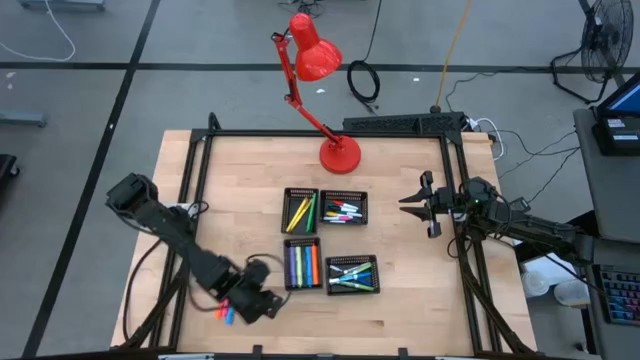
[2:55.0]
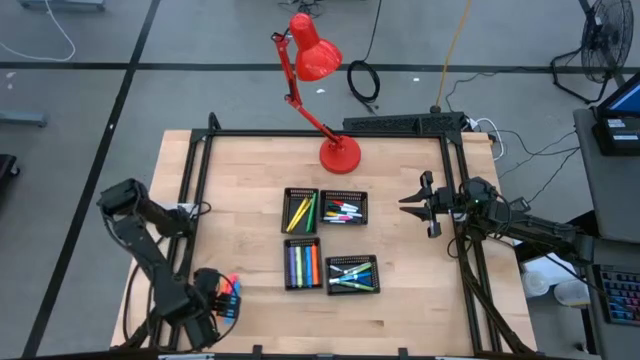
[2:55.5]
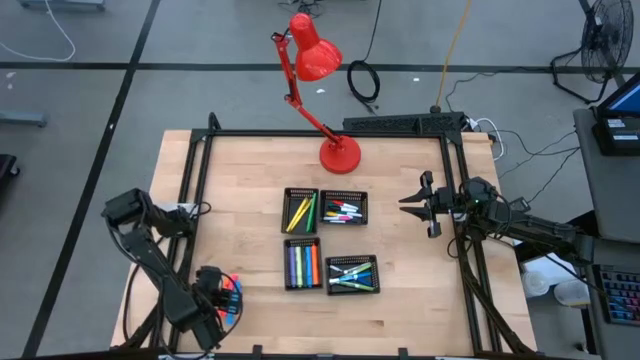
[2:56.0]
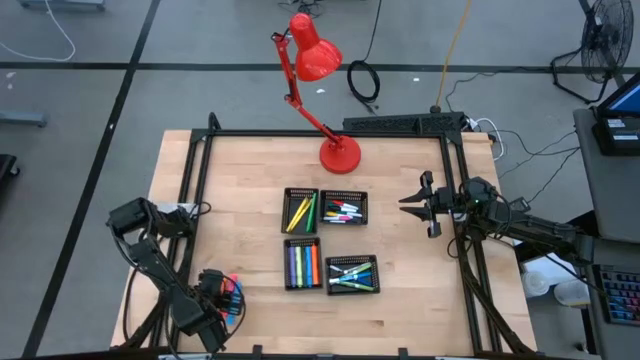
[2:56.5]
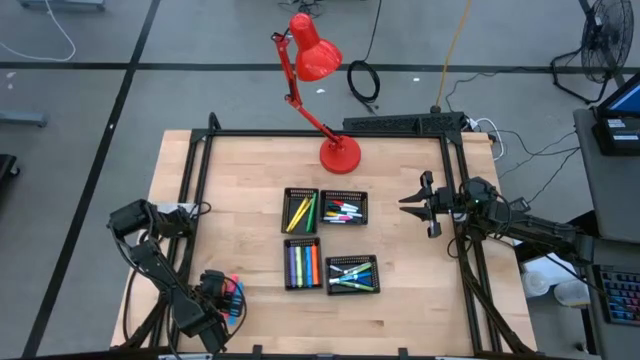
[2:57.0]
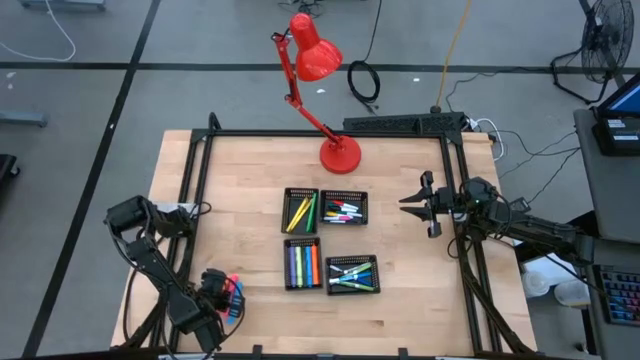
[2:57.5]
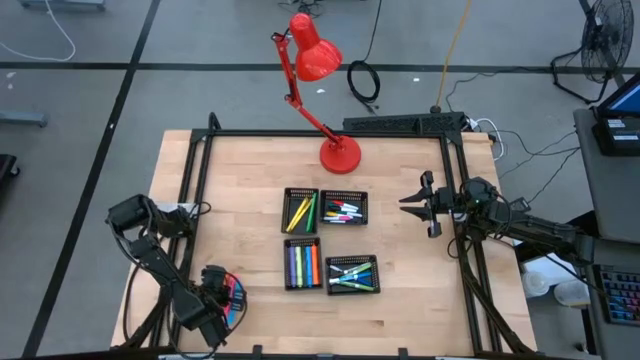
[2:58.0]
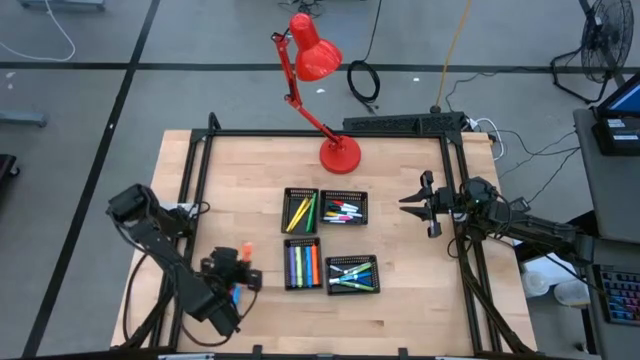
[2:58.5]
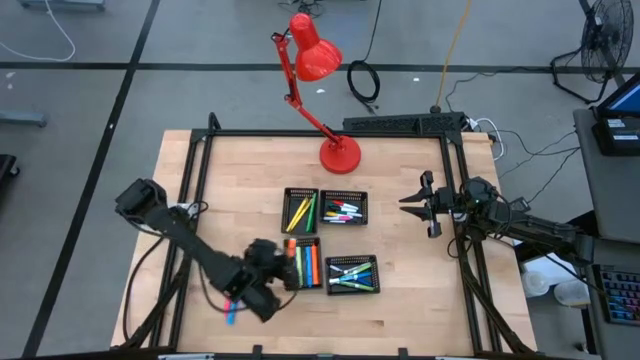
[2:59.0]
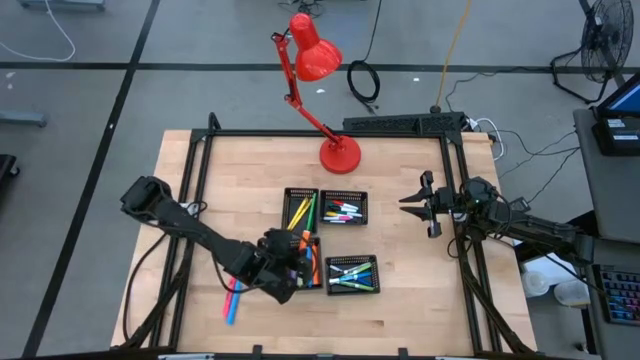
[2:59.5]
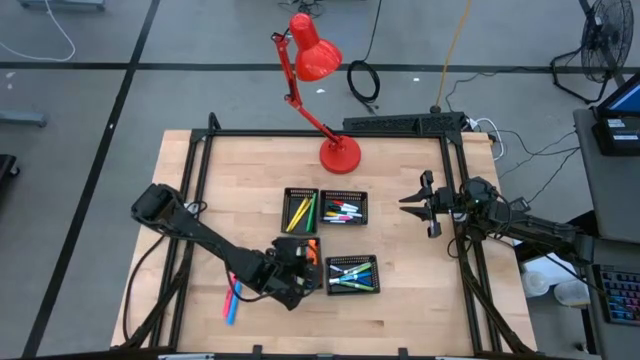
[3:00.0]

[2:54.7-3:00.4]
Task: Pick & Place Markers
Put the orange highlighter into the bottom left black bin

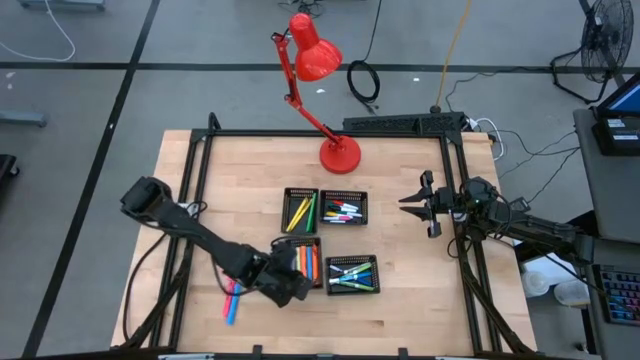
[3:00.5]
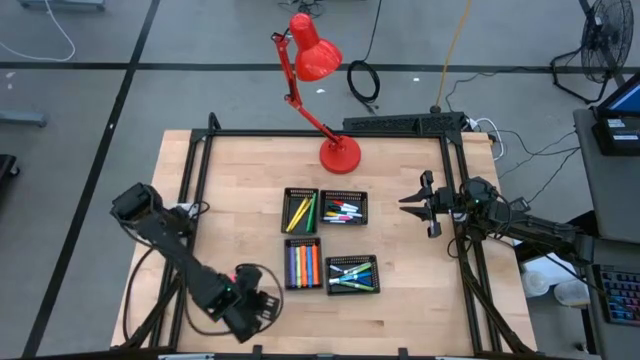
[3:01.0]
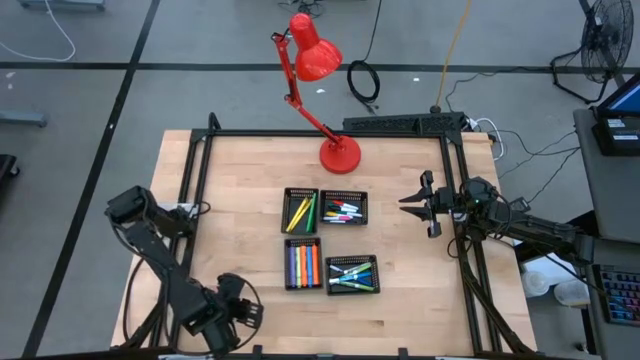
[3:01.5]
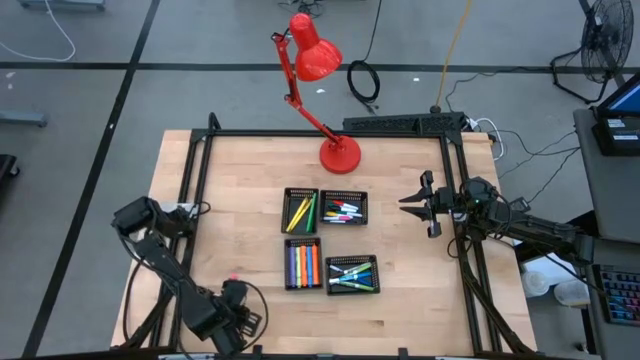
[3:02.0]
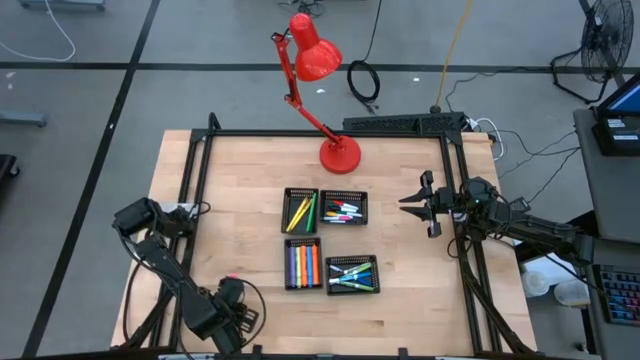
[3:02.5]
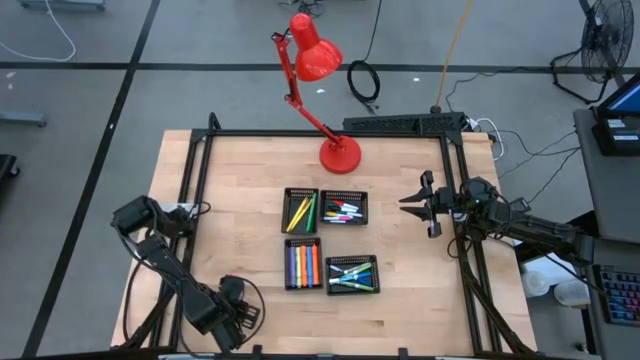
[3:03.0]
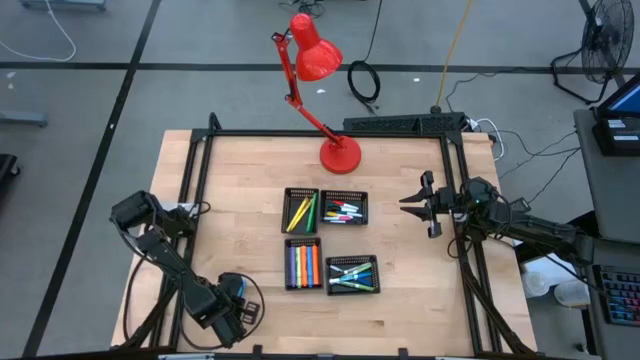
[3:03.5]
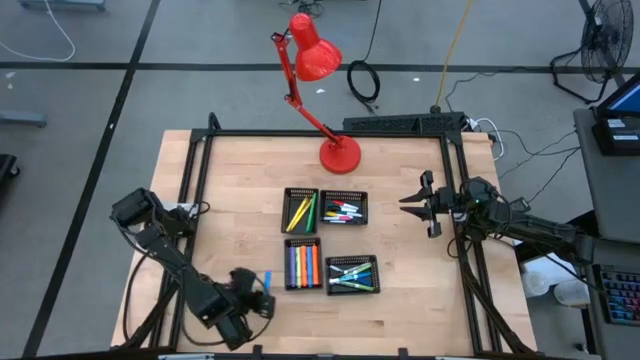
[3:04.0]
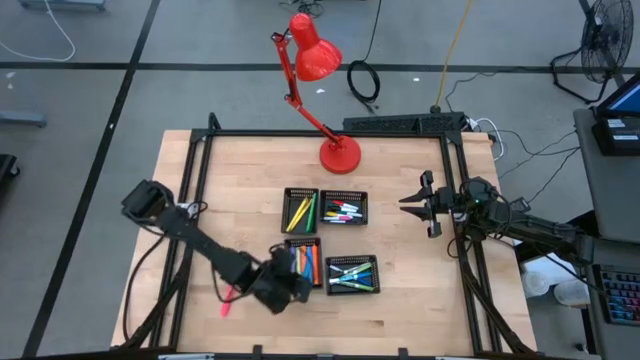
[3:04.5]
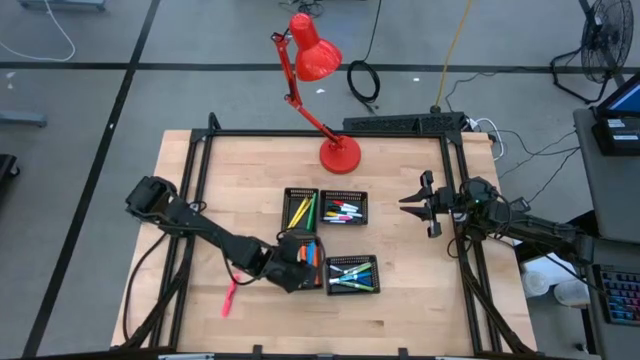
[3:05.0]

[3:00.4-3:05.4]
Put the blue highlighter into the bottom left black bin

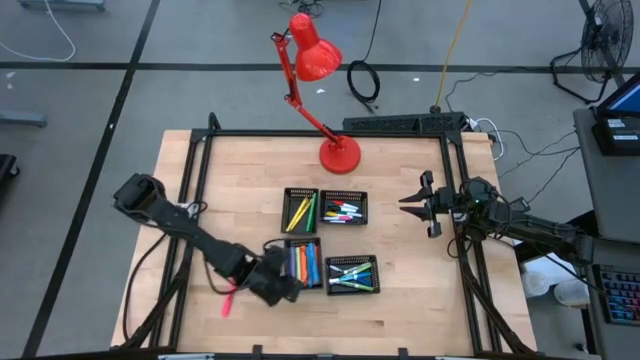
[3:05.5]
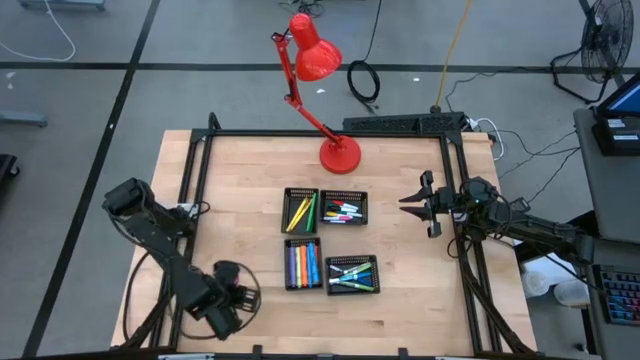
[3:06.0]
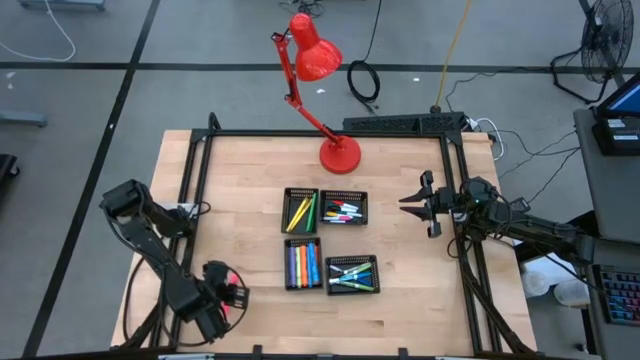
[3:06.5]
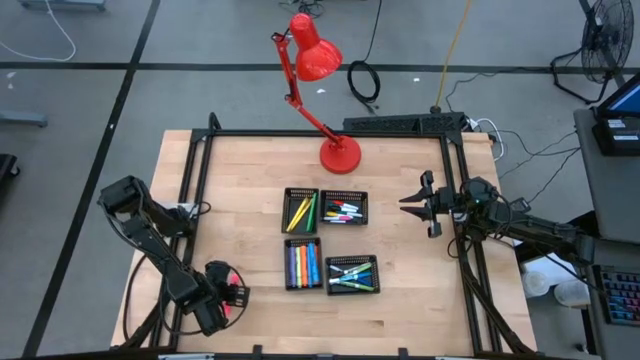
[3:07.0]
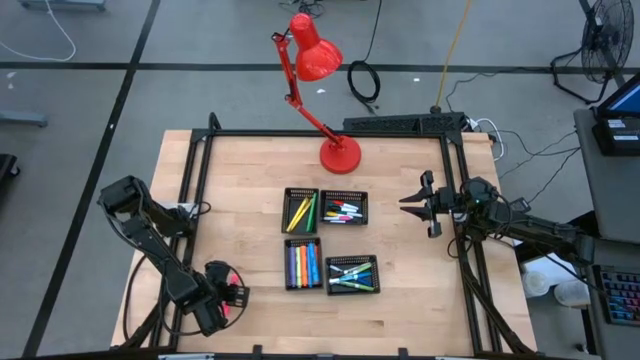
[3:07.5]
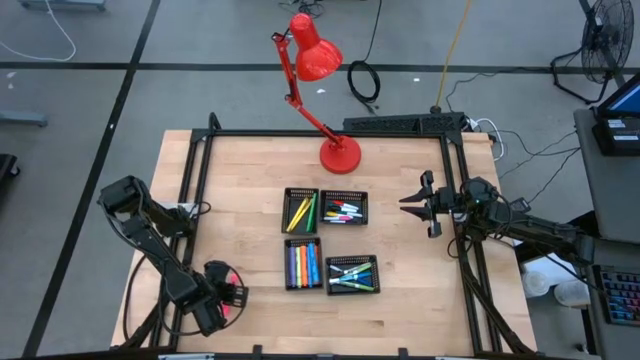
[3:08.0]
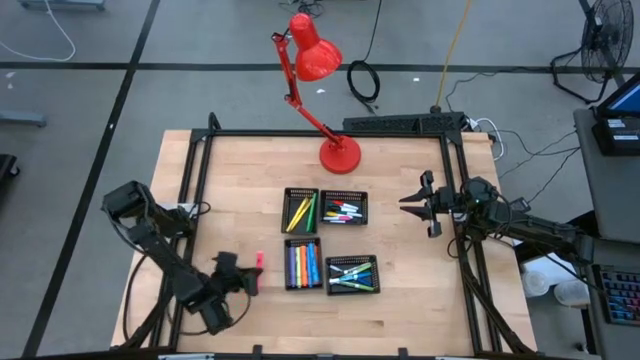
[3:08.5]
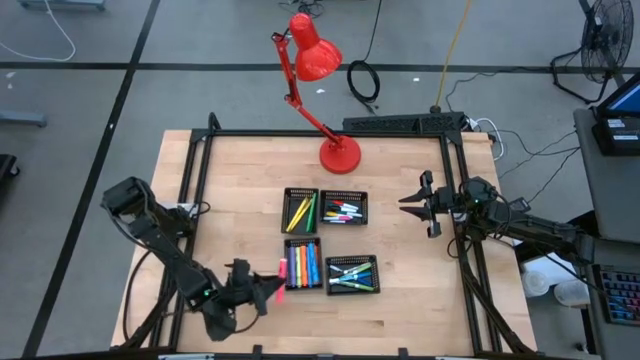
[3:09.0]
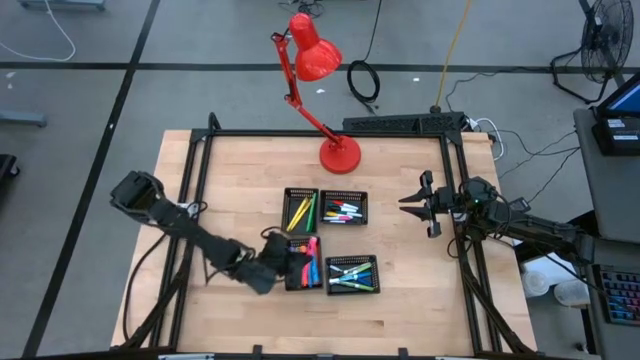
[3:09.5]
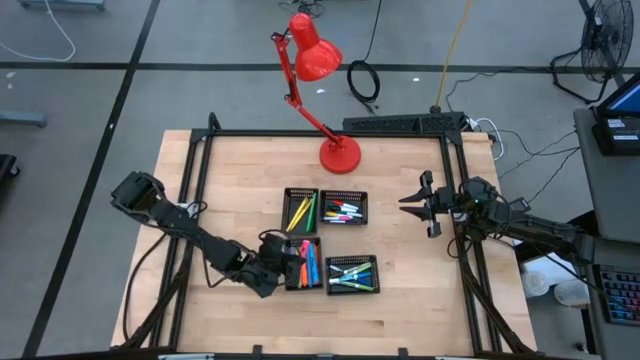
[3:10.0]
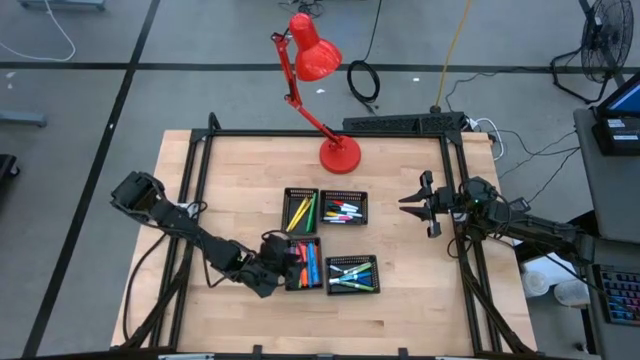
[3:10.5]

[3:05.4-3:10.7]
Put the pink highlighter into the bottom left black bin

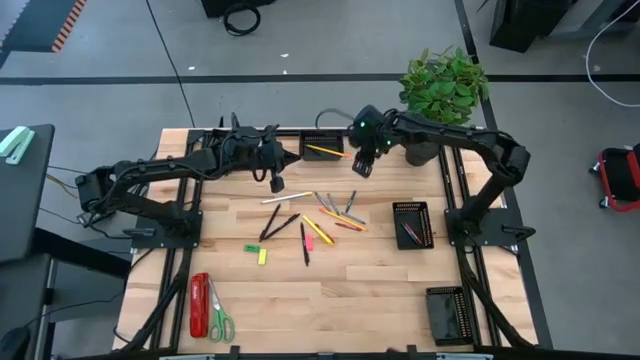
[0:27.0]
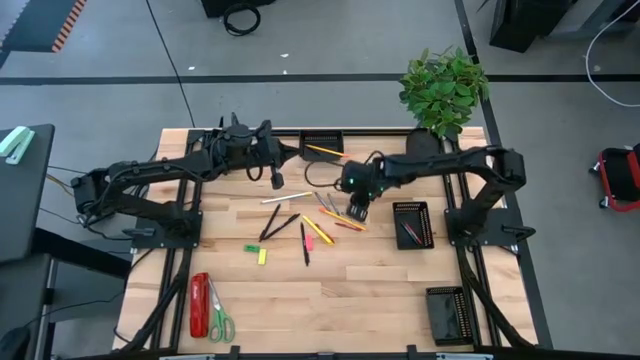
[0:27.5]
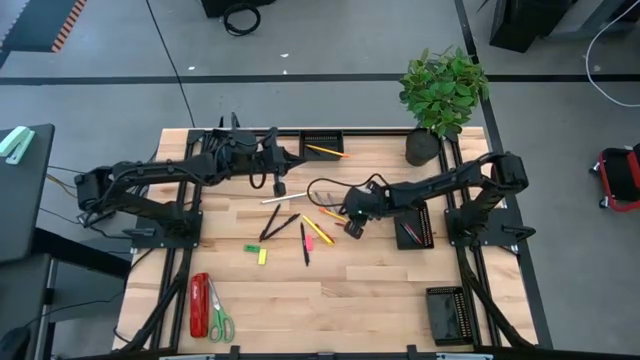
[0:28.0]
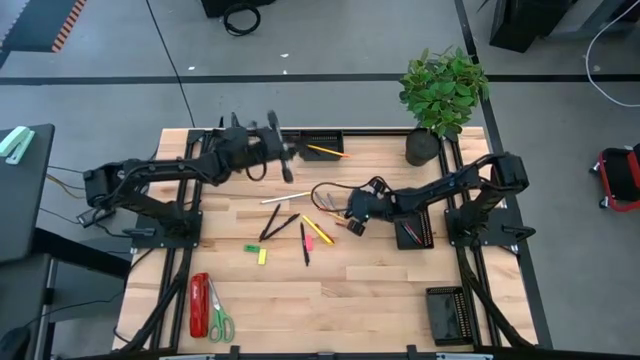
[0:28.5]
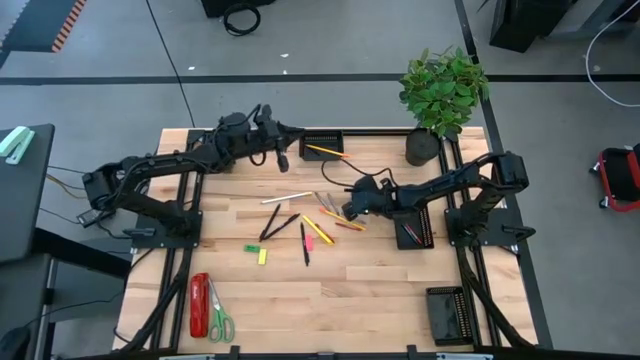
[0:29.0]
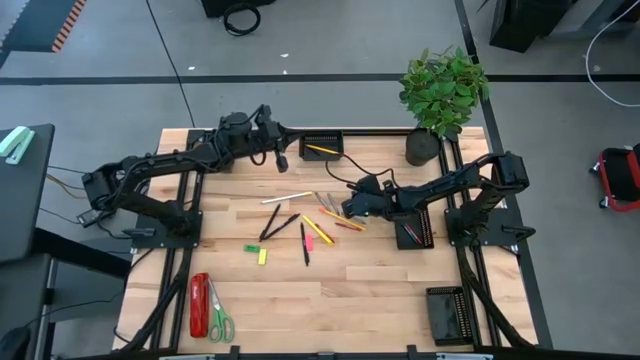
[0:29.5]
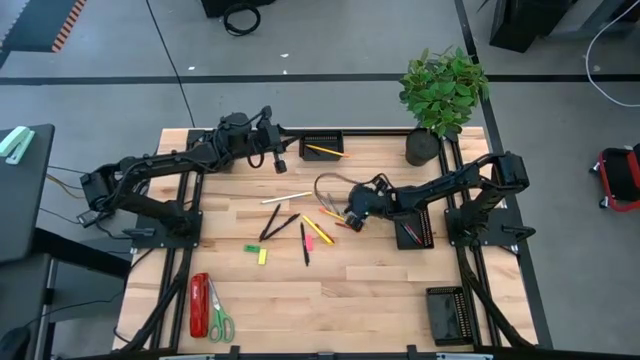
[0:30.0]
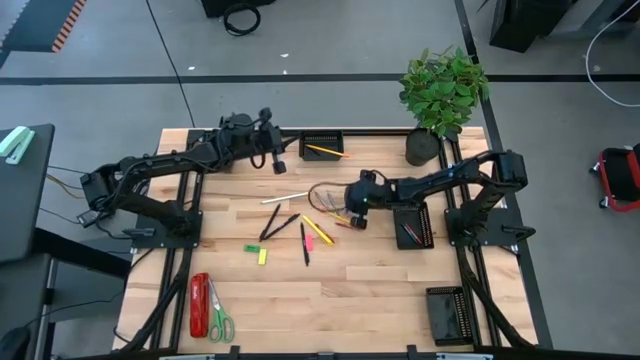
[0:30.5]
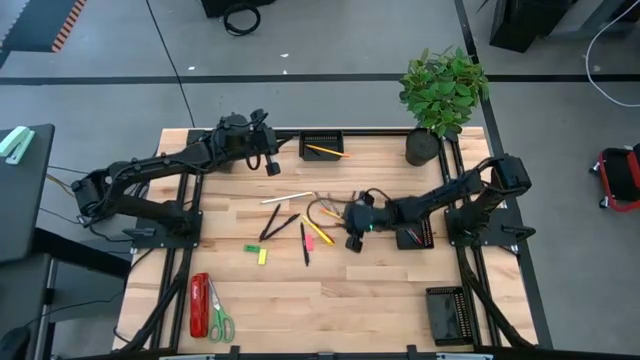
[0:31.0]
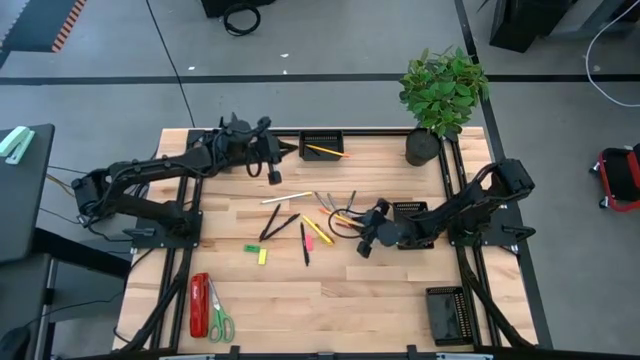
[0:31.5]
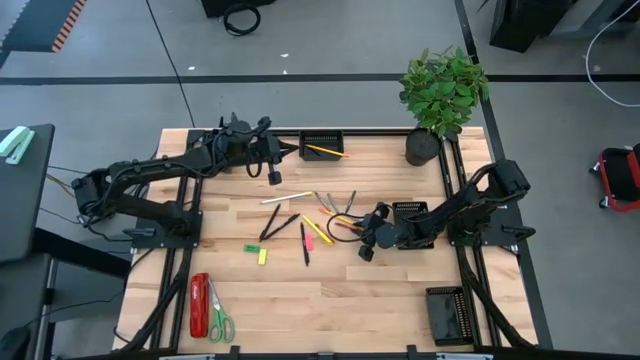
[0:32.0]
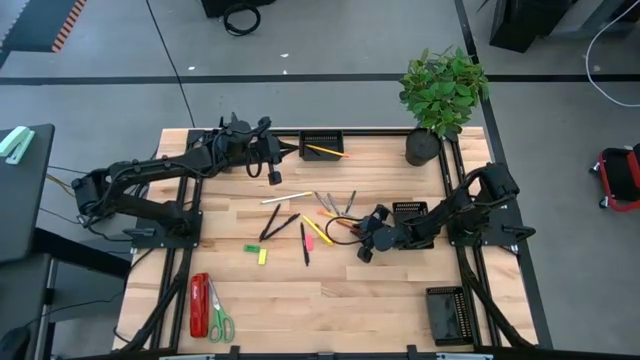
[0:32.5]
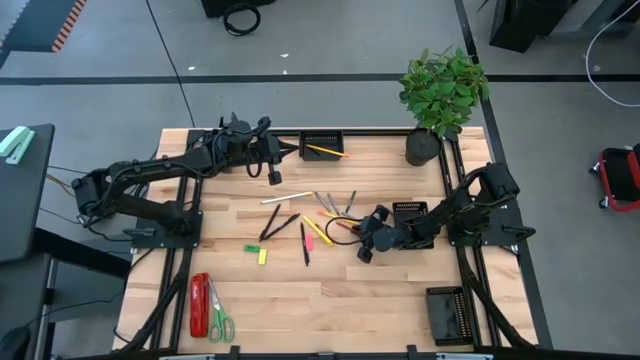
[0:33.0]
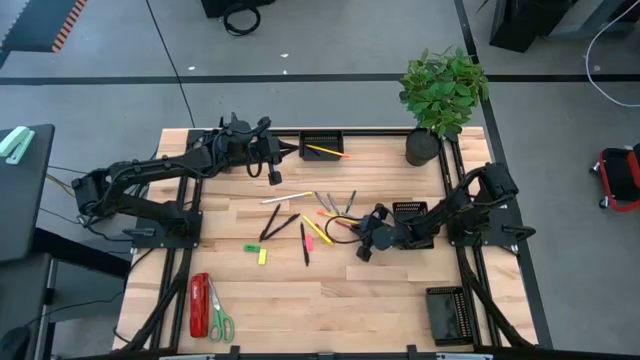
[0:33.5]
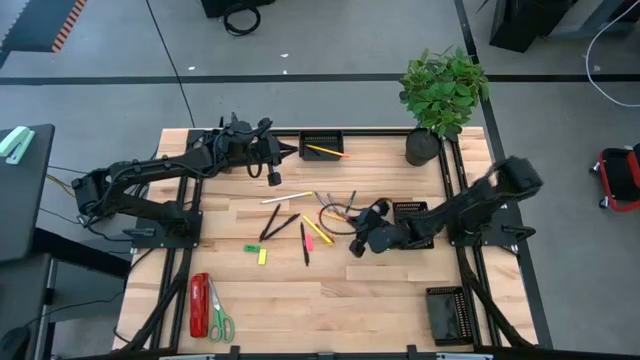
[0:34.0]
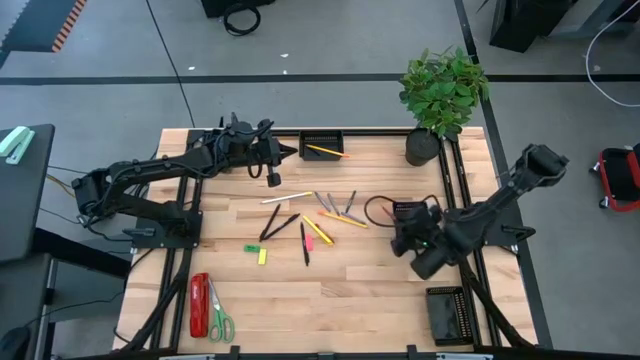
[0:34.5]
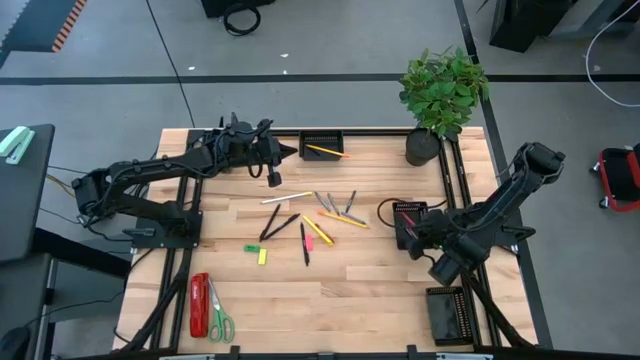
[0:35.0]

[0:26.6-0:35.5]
Task: Sort crayons/erasers/pens/pencils in bins
Put the red crayon into the middle right black bin
